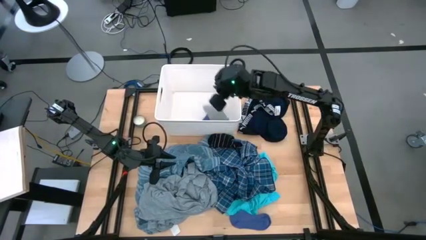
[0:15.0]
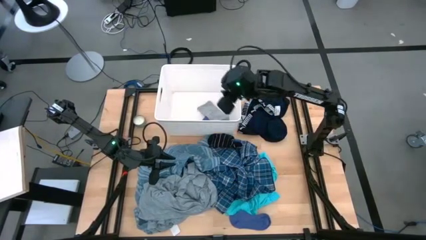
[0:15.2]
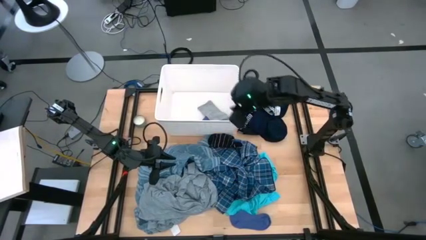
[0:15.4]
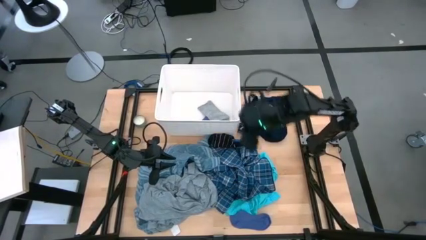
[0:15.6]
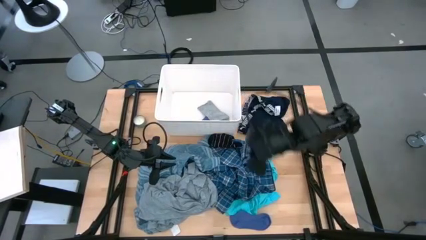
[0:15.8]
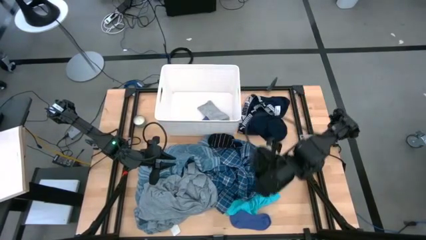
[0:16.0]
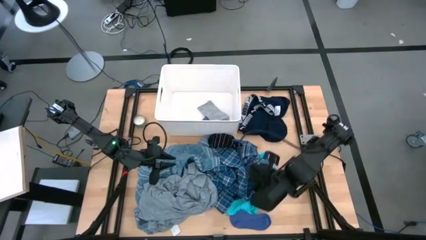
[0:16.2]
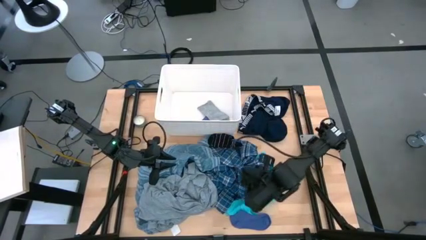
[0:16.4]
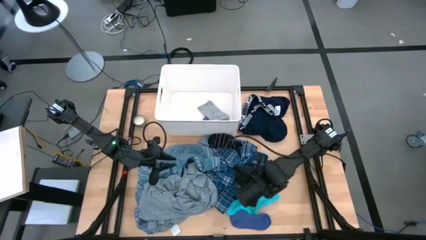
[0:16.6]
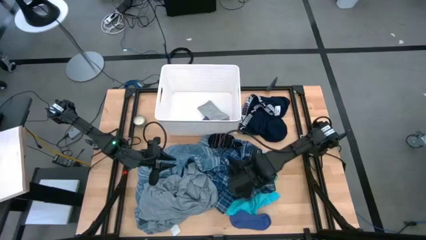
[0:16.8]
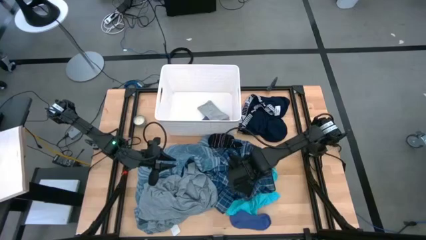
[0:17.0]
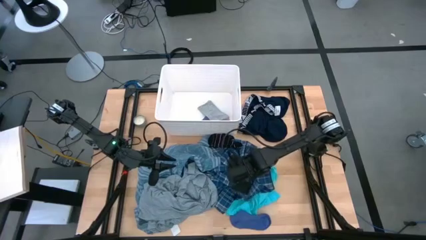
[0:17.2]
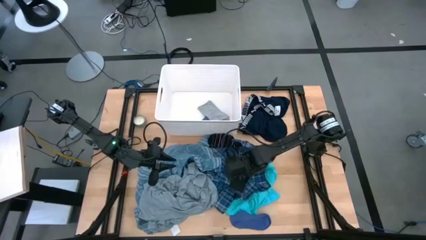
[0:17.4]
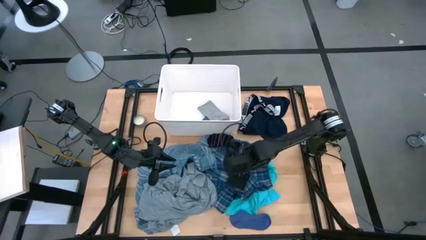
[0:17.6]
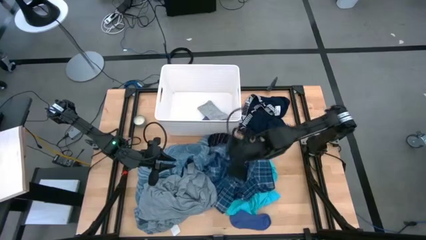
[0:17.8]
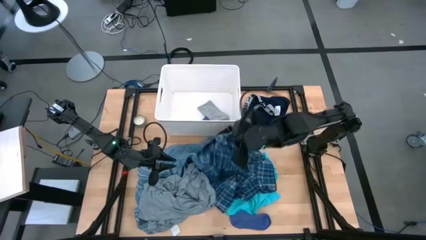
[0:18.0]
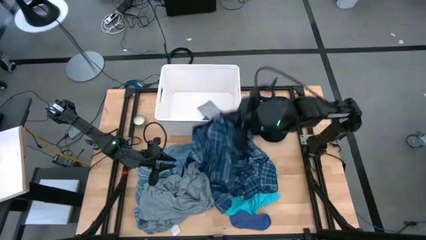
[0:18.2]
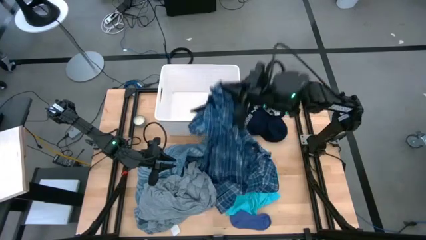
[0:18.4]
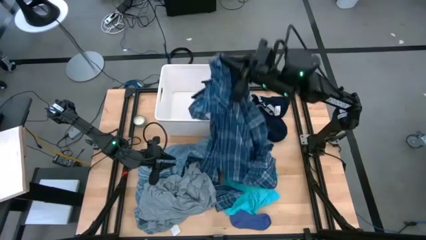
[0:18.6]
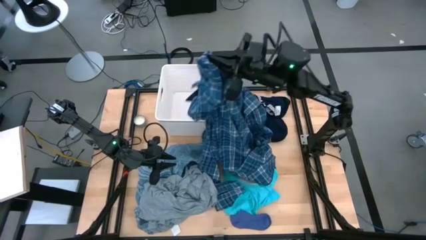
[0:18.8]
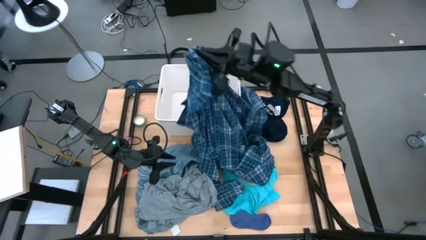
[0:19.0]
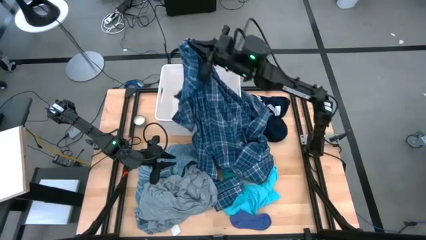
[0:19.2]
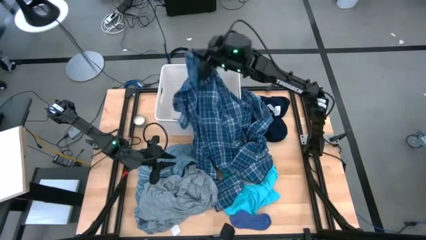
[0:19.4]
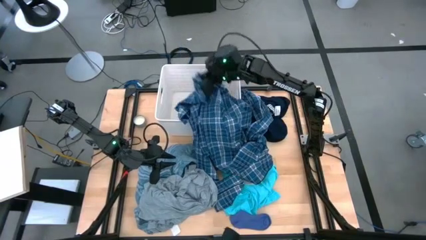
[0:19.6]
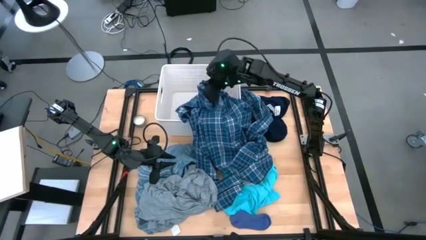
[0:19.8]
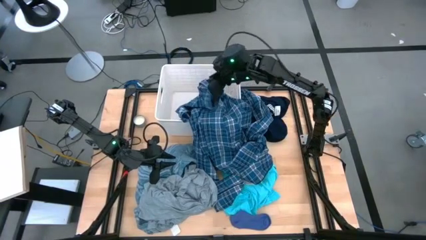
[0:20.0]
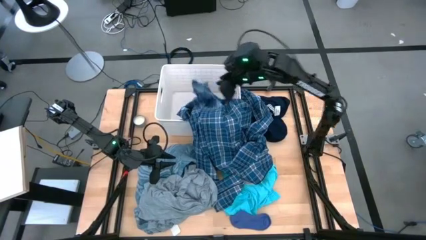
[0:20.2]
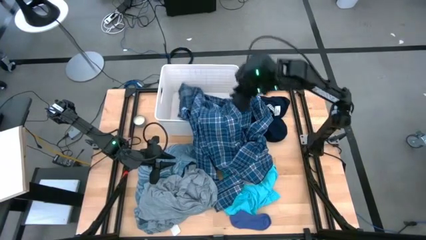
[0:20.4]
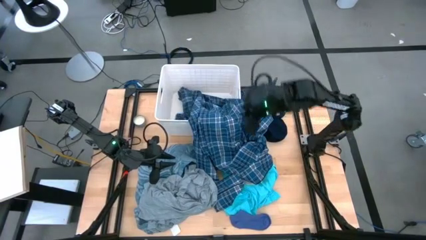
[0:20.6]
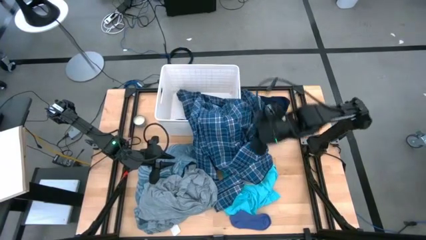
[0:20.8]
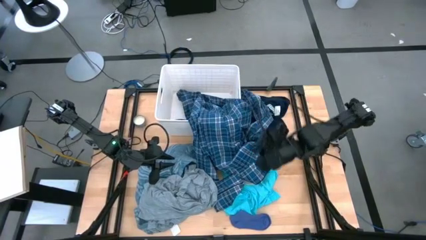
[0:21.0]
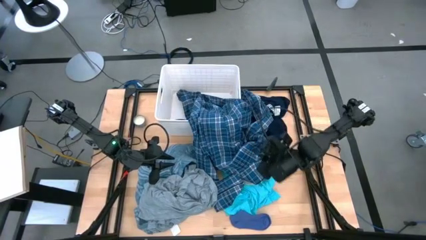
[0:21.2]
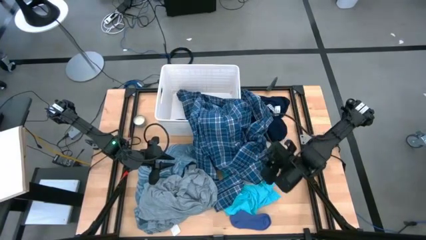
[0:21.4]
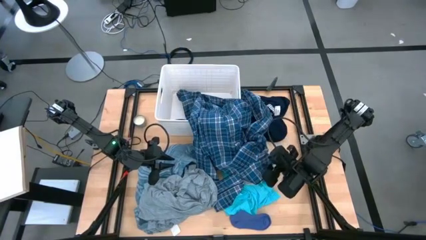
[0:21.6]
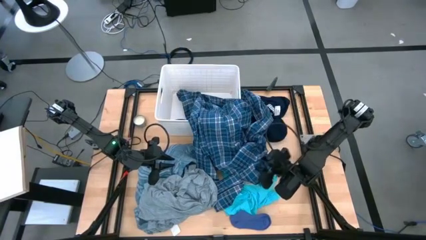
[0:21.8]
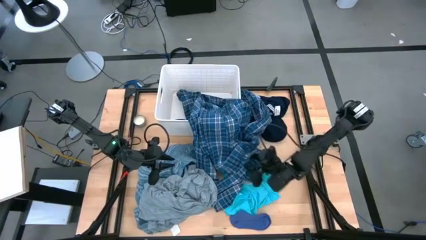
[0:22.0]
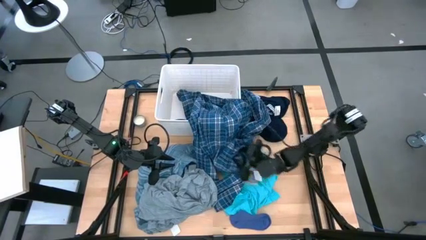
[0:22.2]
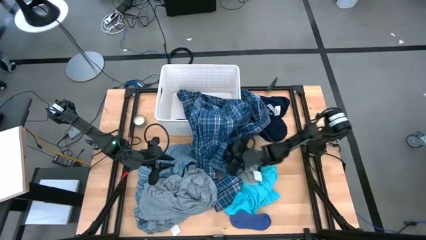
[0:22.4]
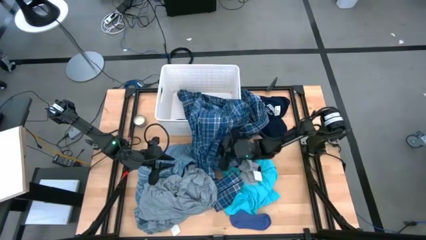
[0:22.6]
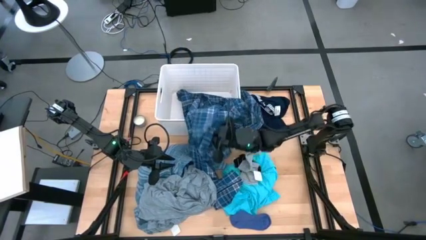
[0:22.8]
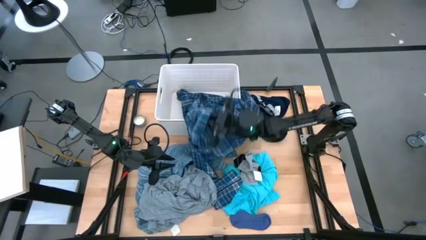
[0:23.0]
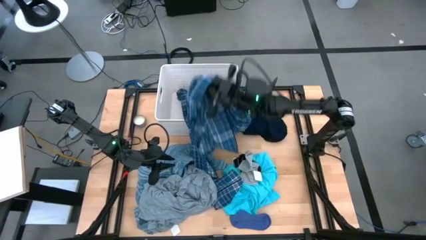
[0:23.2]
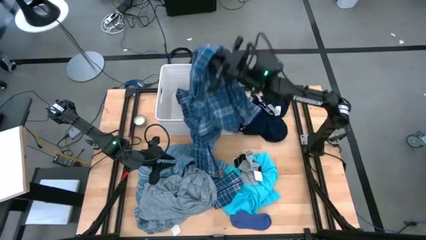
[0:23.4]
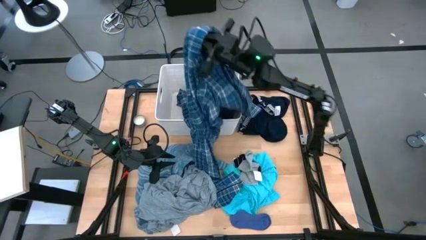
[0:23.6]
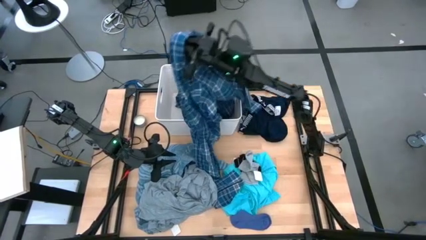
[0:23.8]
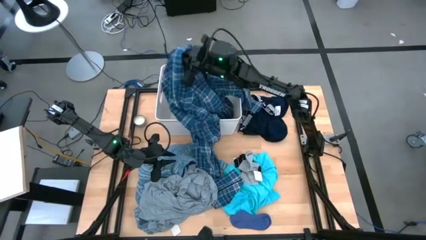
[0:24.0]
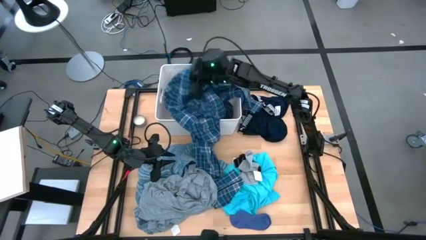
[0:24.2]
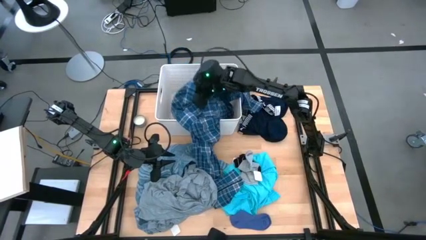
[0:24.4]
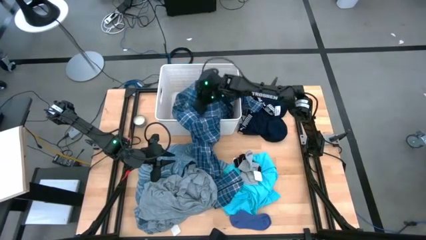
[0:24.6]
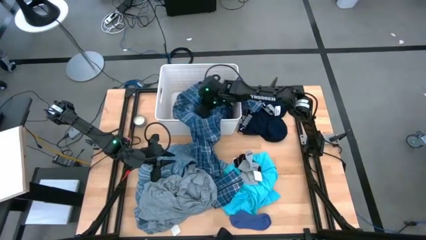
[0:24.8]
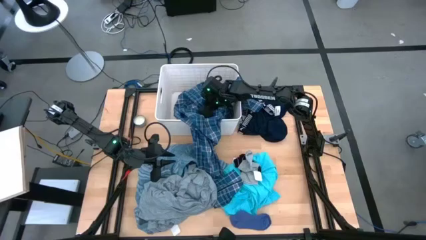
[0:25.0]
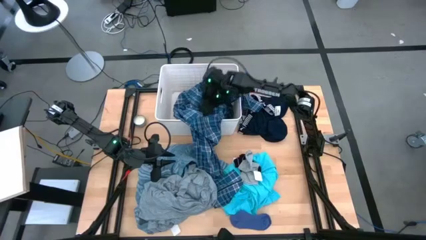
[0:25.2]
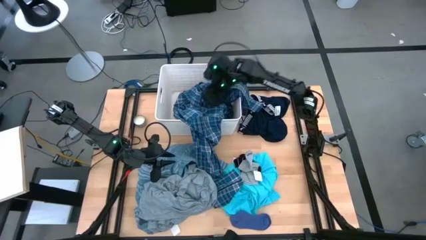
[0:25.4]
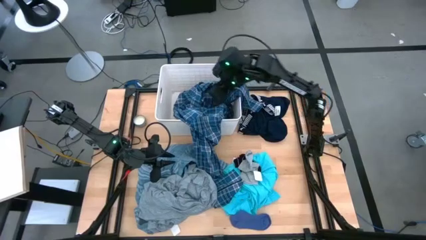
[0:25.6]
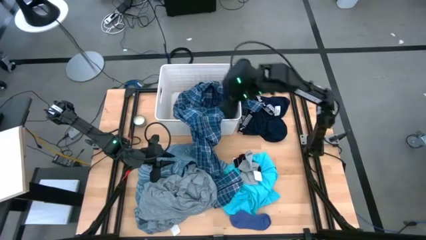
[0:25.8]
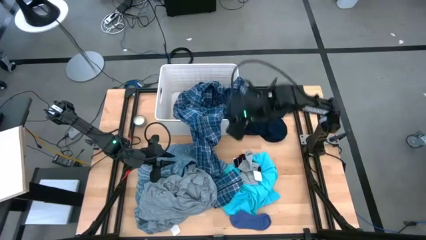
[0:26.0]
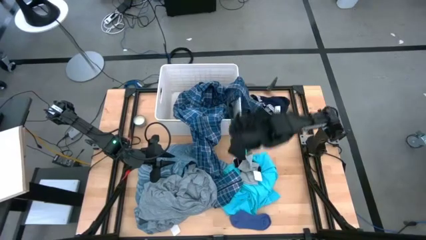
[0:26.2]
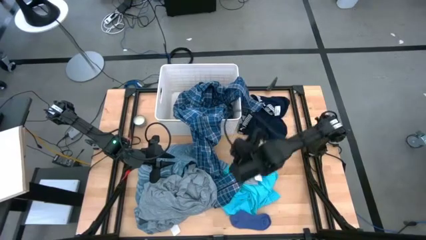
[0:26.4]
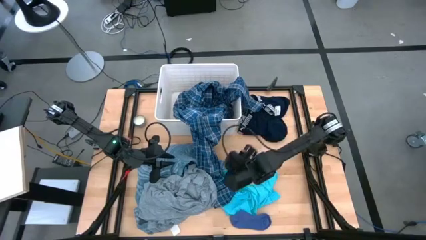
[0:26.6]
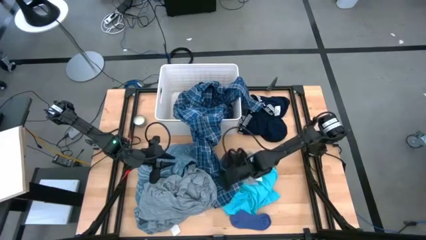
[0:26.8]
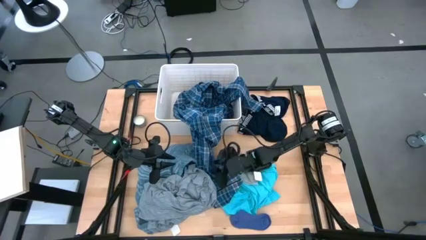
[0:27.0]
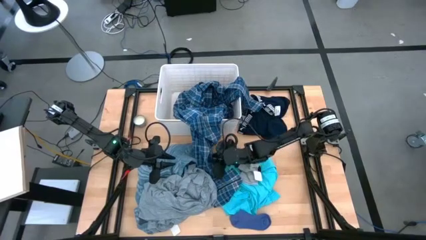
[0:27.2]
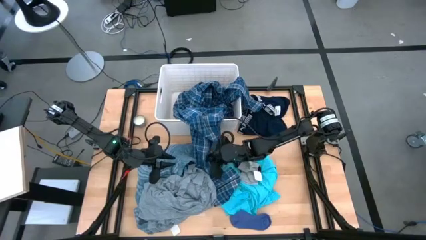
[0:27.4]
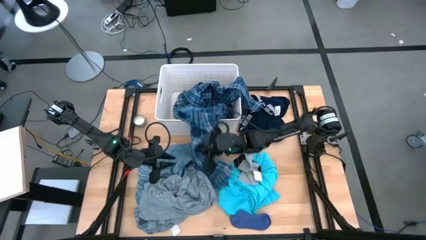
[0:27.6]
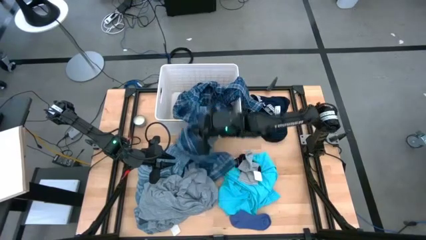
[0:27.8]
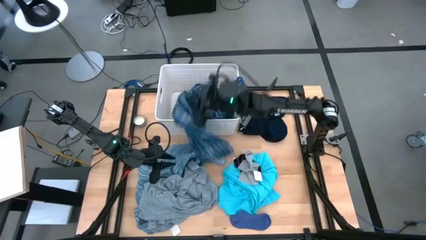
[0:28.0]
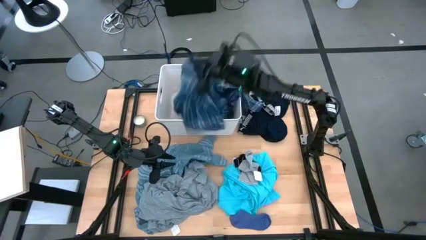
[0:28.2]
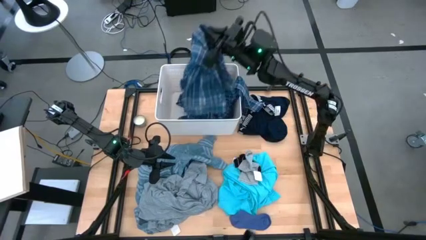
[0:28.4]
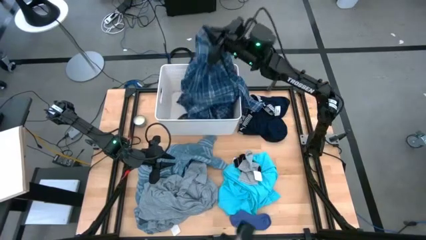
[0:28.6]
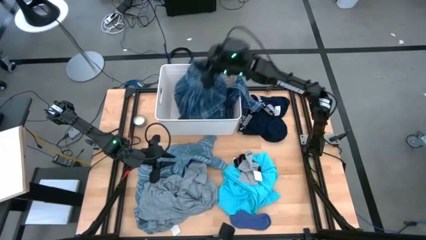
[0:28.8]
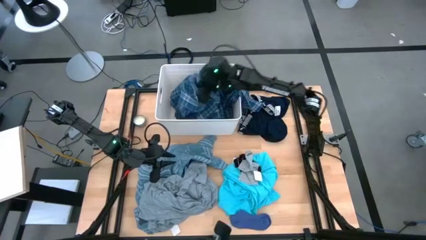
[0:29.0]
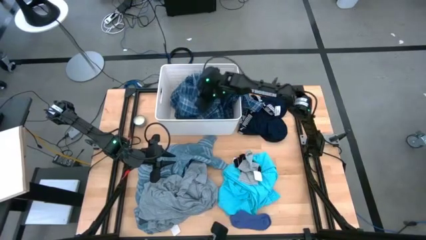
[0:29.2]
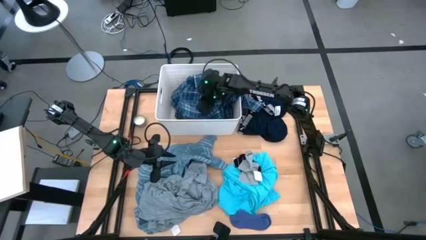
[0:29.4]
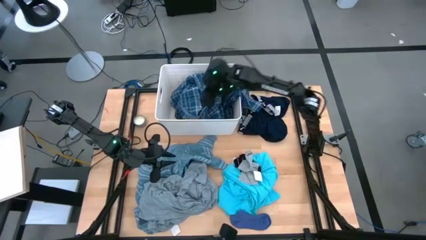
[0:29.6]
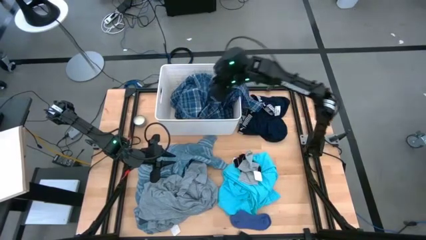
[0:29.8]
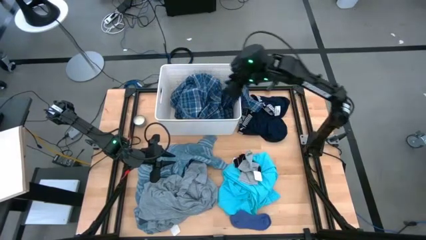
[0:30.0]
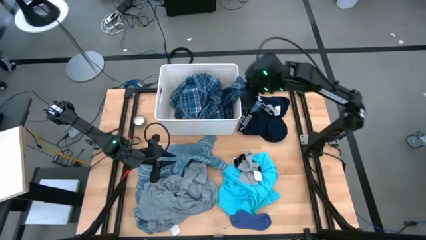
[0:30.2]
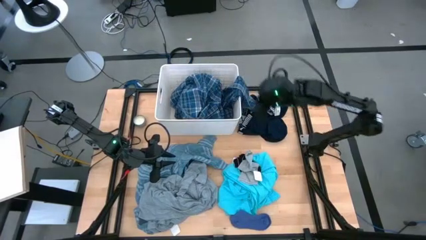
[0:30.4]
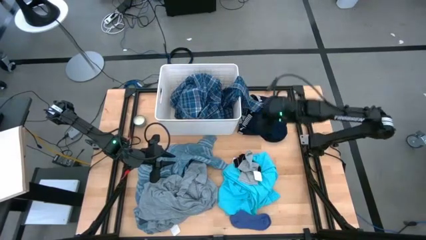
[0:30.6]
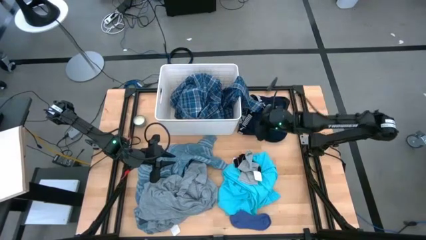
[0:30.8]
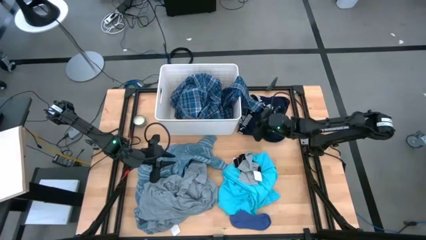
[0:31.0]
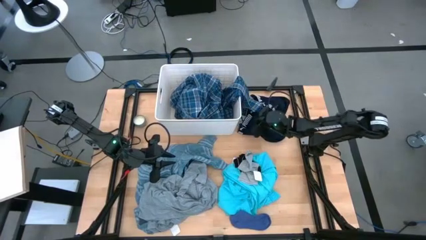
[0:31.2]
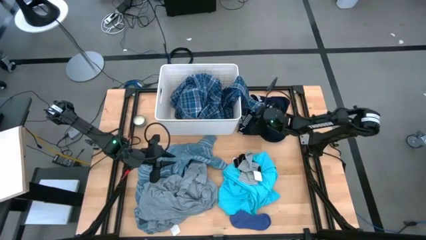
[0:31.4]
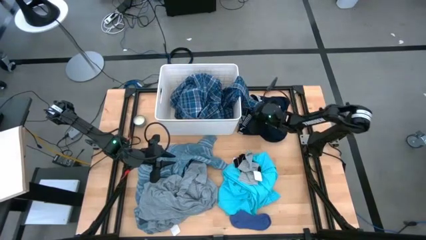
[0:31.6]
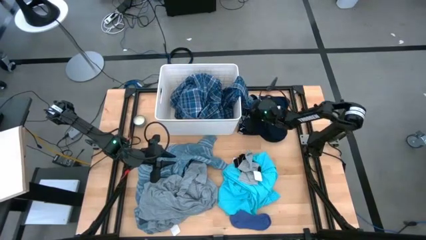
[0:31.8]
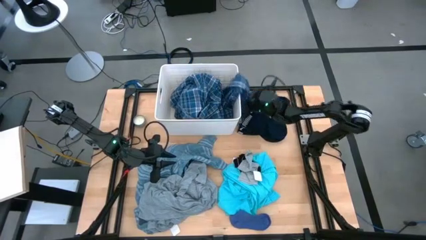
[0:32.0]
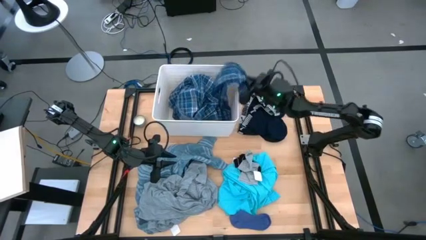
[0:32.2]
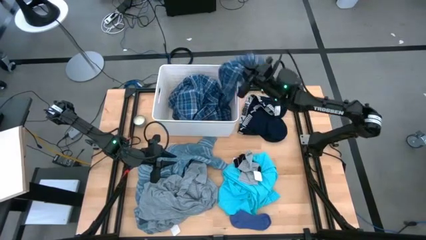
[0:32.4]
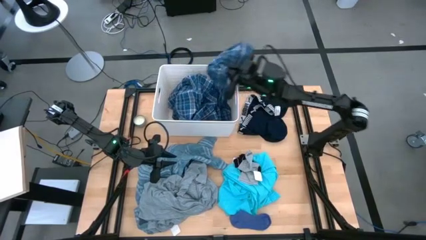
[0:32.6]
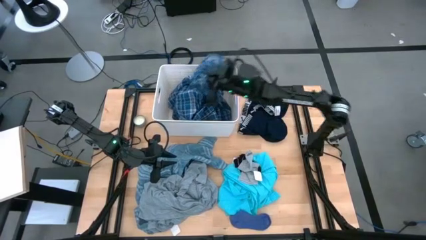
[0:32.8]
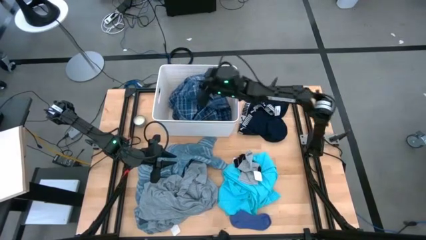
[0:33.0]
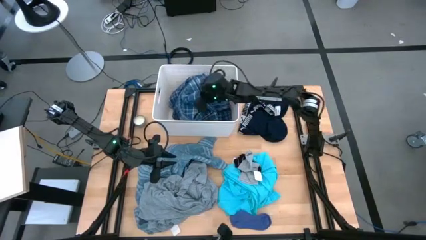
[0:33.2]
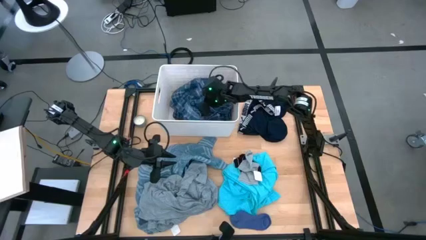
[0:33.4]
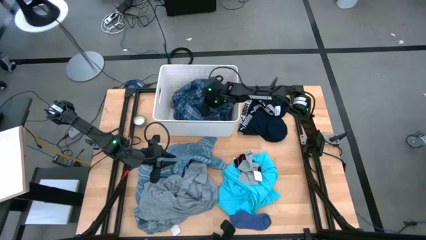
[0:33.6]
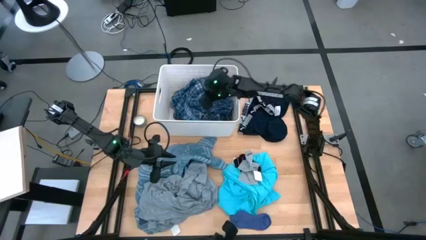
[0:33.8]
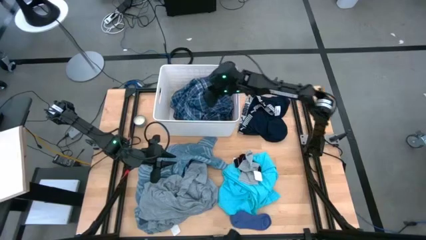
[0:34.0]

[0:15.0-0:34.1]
Task: Sort clothes
Put the blue checkered shirt into the white laundry bin
